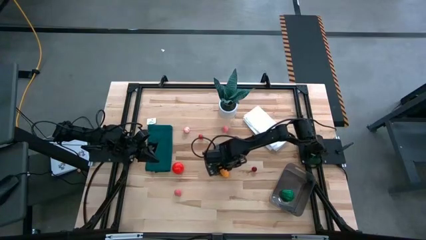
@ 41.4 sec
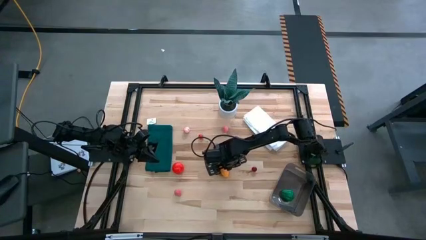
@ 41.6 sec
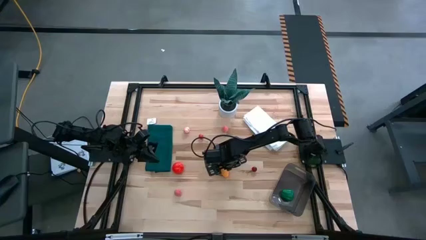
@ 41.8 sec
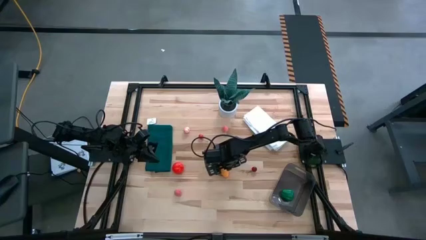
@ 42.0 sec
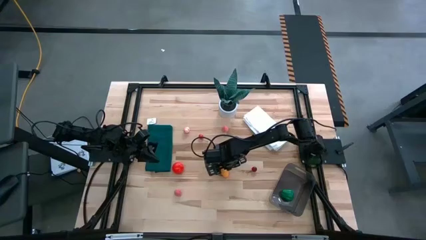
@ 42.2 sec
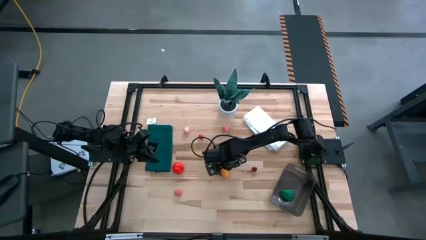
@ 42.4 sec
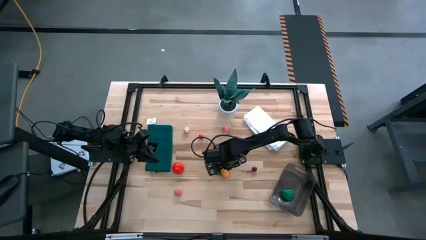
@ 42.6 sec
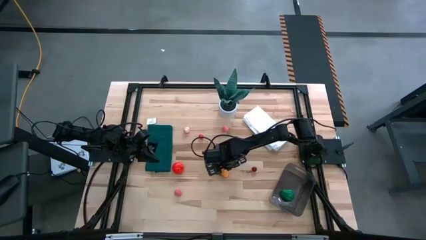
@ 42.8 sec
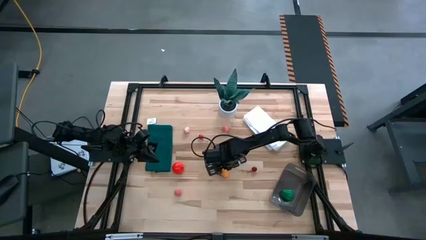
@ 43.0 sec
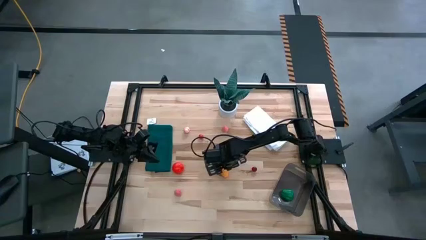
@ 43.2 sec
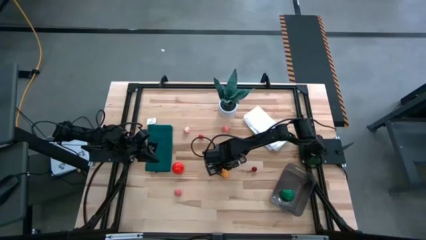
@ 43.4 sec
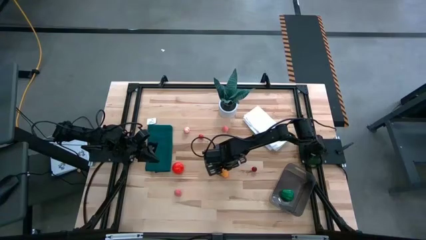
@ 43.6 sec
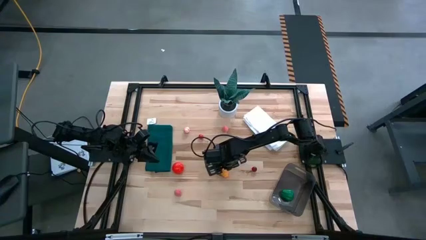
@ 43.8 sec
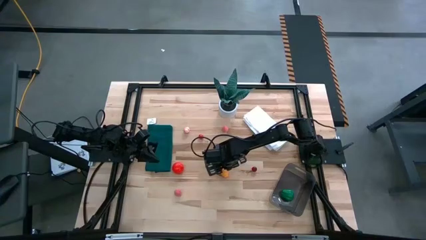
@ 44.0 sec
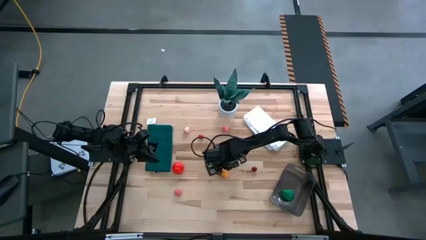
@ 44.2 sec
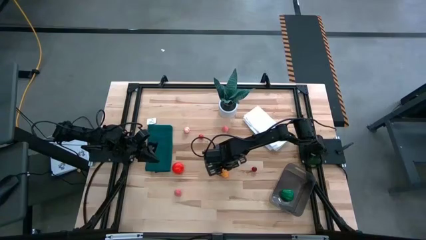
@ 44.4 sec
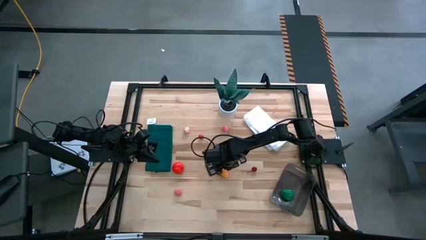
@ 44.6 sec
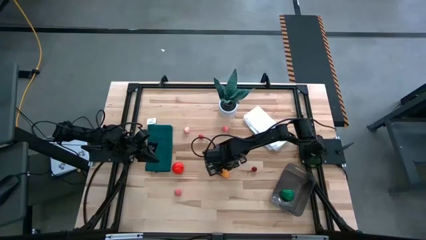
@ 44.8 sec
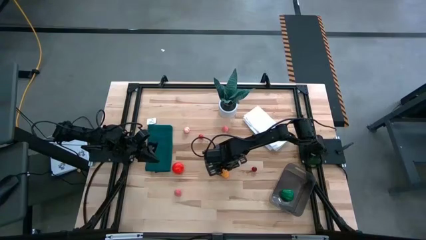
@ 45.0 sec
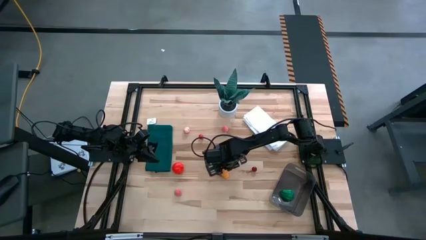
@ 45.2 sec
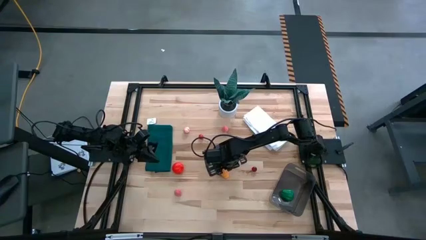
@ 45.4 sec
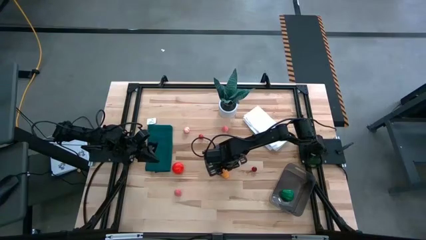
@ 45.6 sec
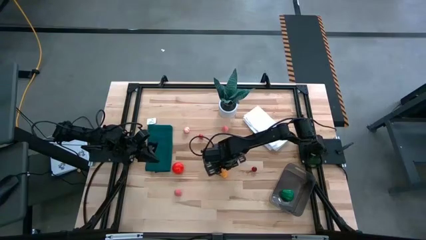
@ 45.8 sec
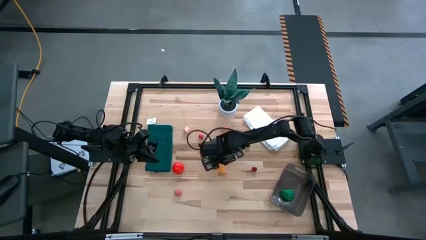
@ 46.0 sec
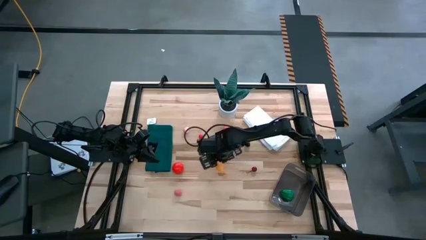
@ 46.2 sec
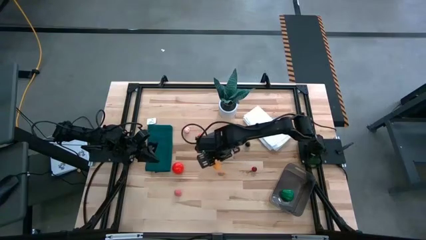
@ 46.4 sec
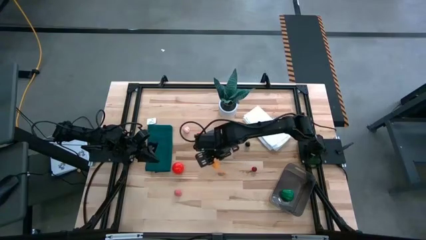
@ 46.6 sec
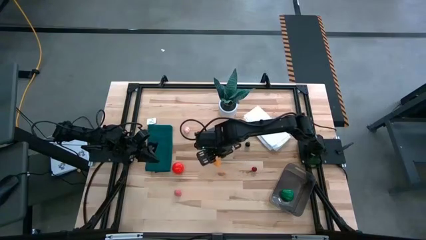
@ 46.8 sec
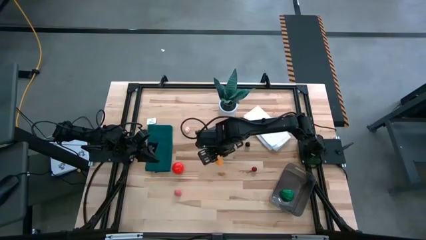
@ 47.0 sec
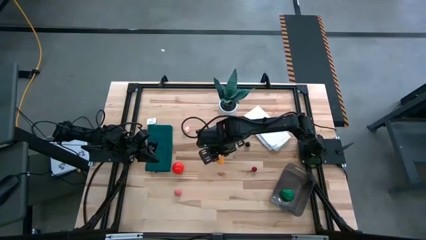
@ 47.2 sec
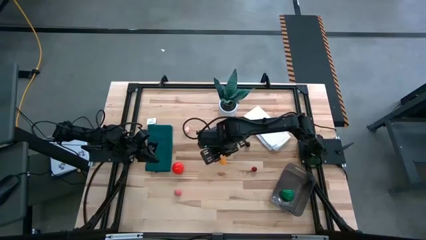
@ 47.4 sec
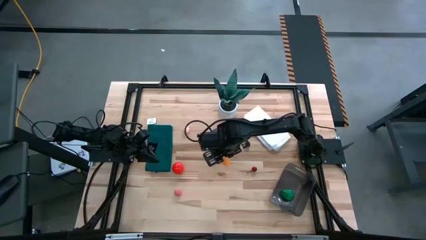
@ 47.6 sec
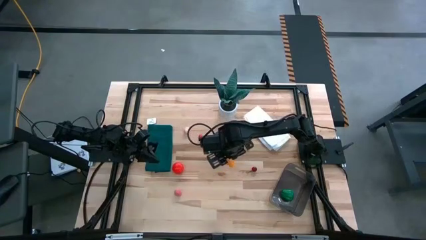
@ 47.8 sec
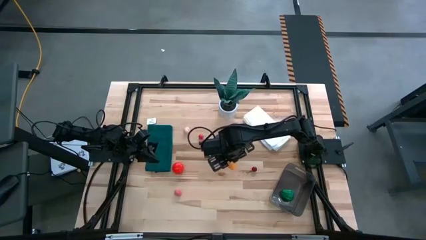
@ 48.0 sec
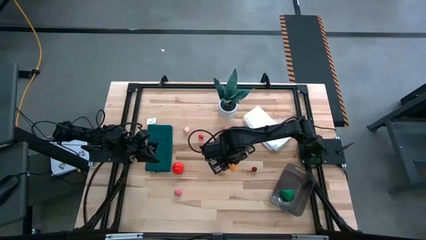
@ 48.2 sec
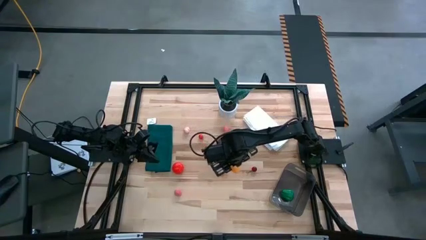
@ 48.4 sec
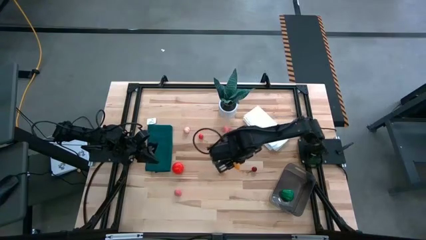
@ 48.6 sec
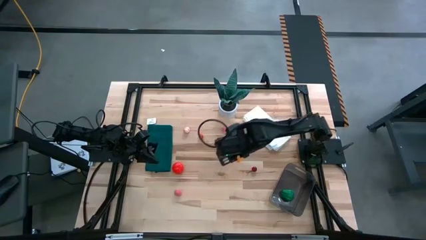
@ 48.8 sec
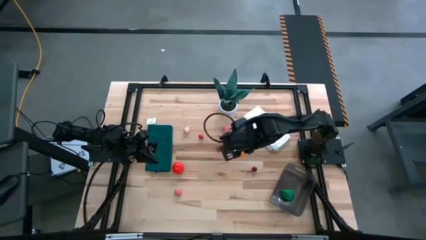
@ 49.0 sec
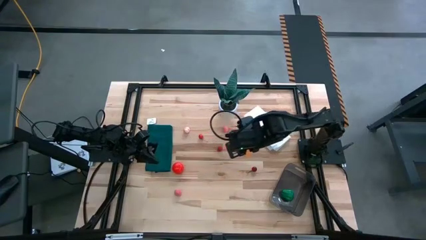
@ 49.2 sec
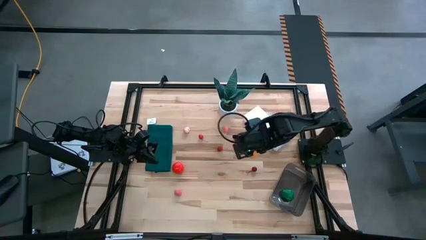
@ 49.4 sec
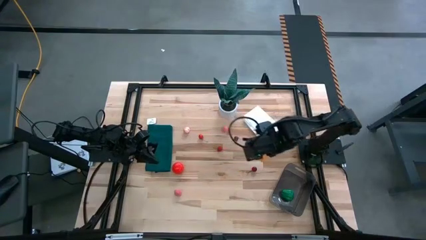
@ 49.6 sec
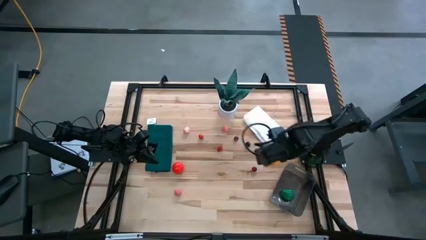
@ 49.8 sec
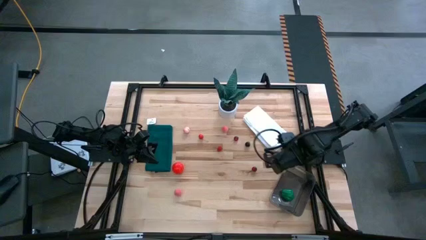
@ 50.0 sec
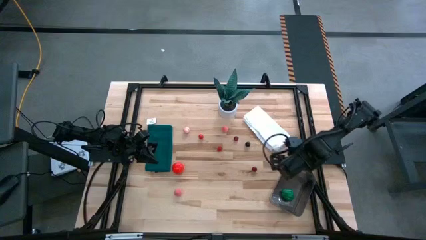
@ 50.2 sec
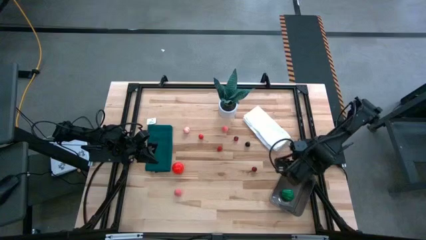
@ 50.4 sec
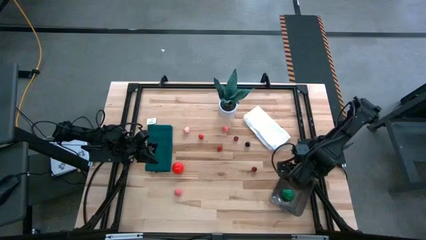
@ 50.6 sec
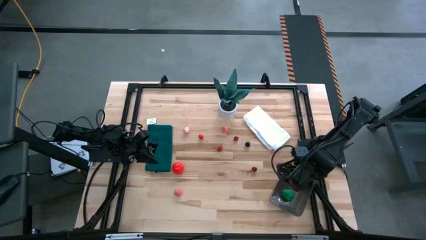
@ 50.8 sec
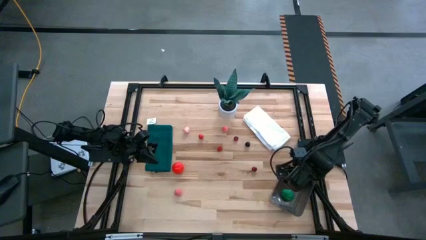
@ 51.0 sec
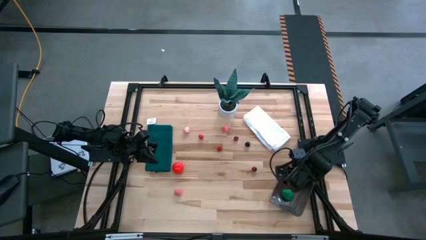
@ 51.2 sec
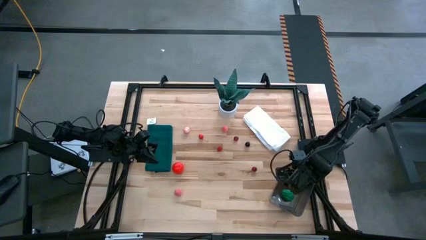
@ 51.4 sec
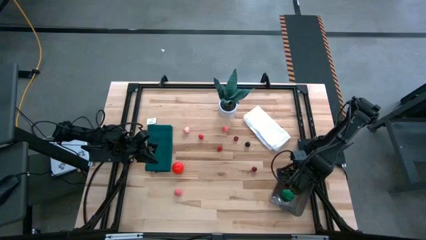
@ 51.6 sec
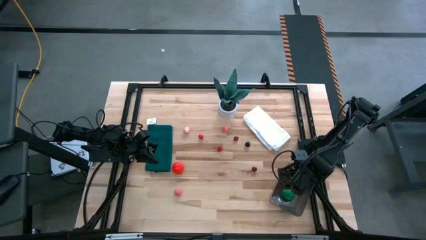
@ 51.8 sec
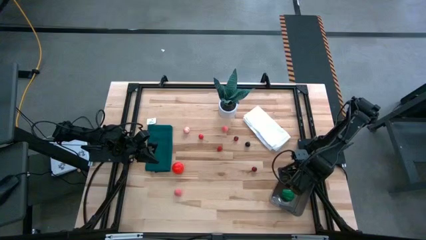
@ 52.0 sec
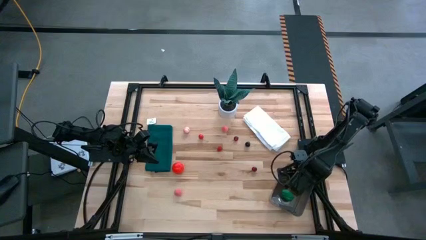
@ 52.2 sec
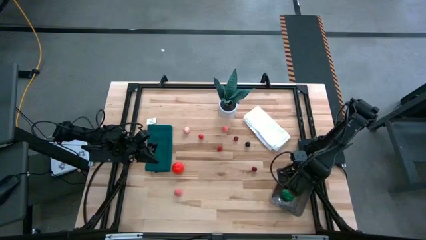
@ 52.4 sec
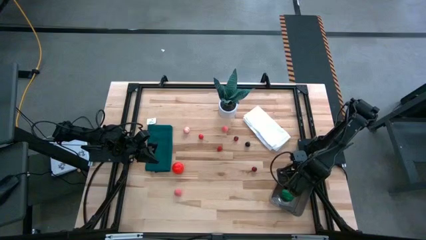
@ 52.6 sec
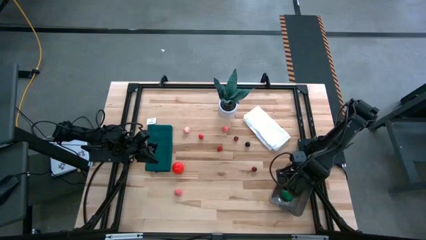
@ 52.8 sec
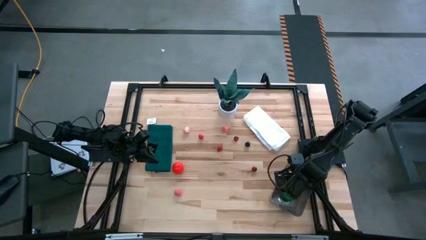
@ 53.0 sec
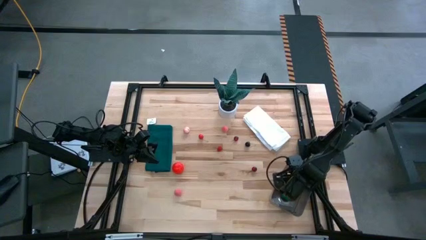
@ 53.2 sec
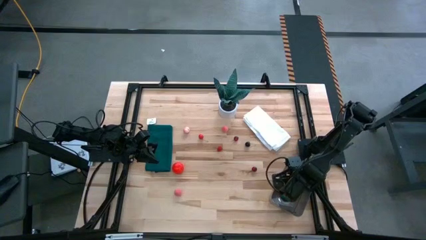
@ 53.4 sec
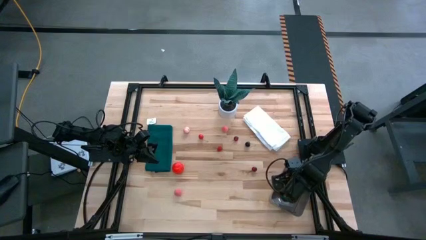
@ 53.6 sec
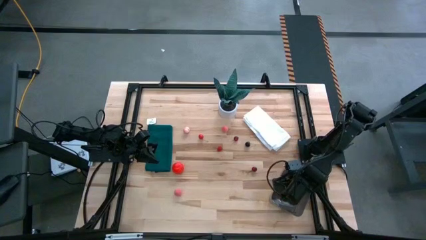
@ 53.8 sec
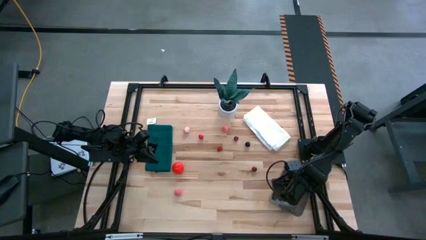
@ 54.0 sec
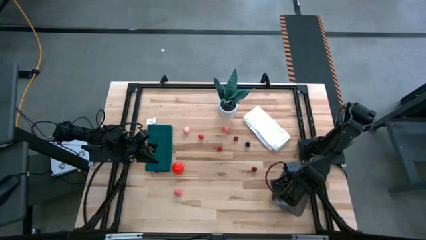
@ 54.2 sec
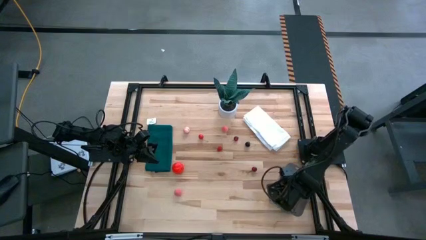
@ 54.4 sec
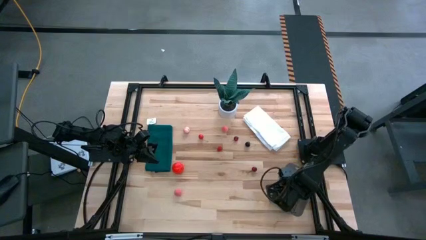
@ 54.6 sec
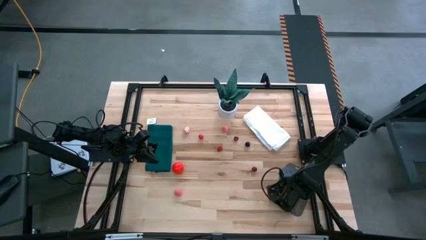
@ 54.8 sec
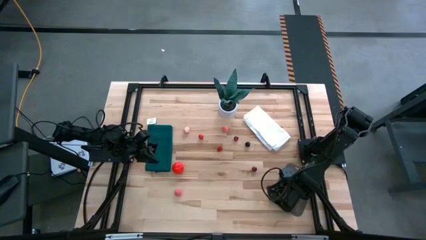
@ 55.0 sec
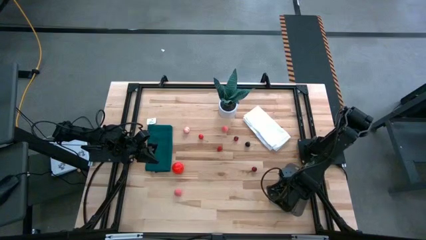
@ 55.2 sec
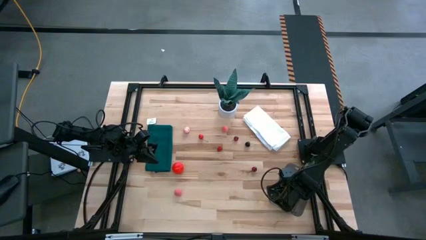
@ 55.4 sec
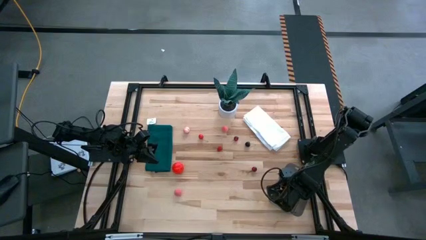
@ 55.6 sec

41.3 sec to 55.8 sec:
Task: Pick and placing Produce into tupperware
Put the orange croissant into the black bin
